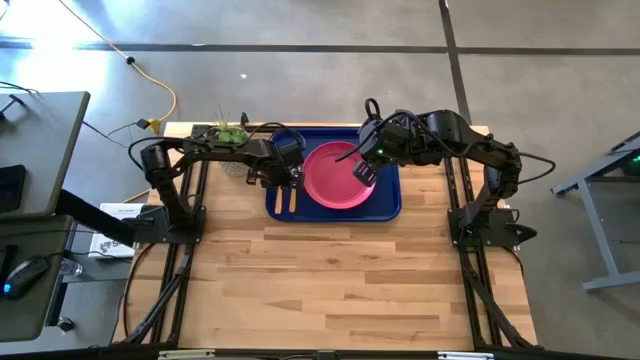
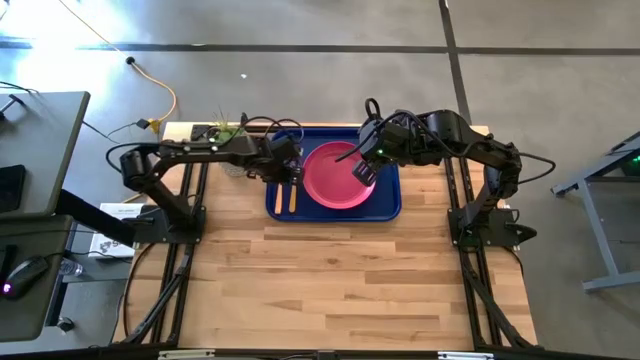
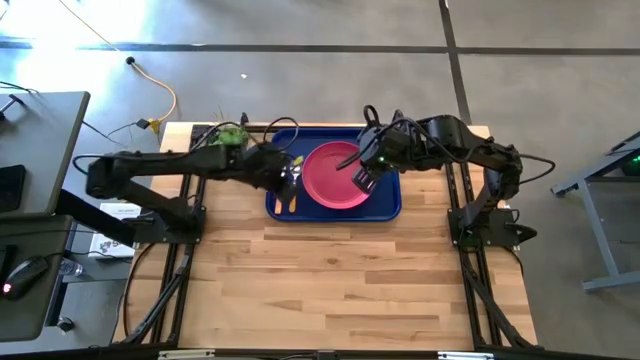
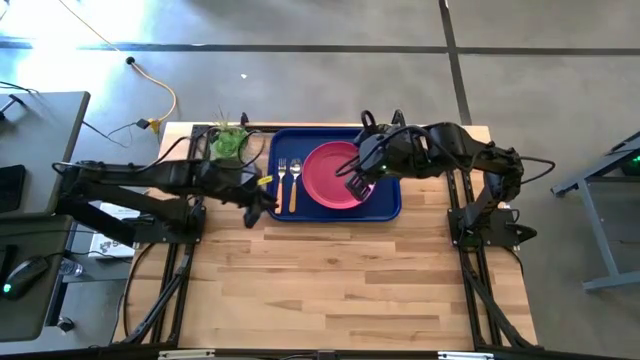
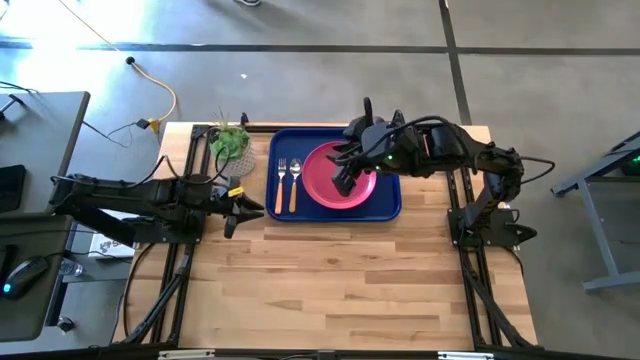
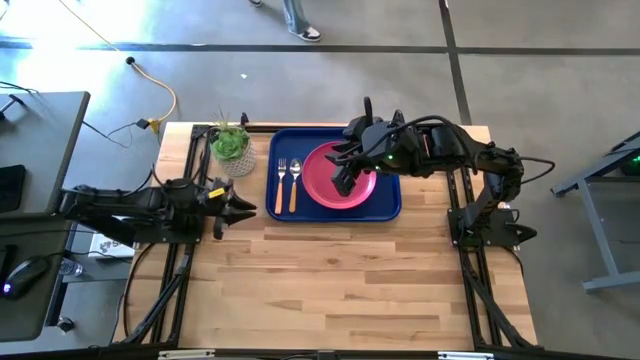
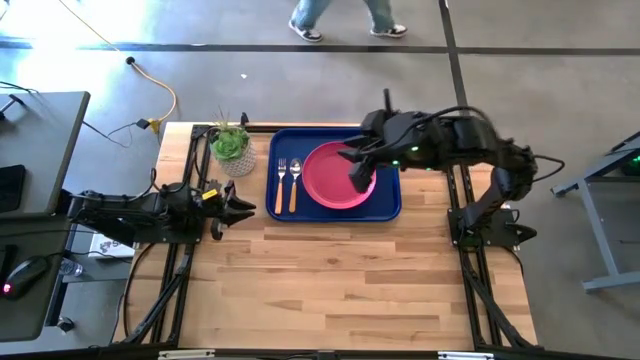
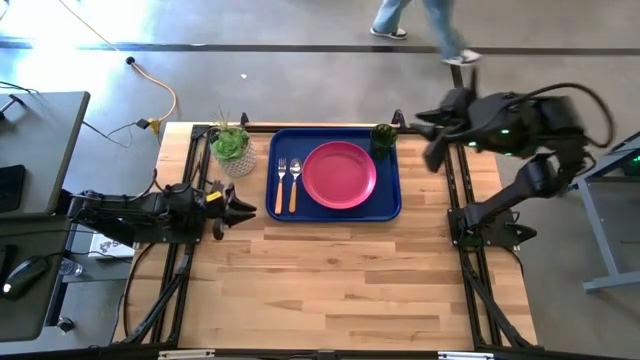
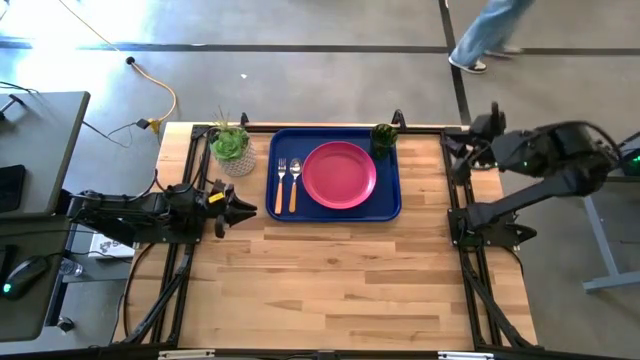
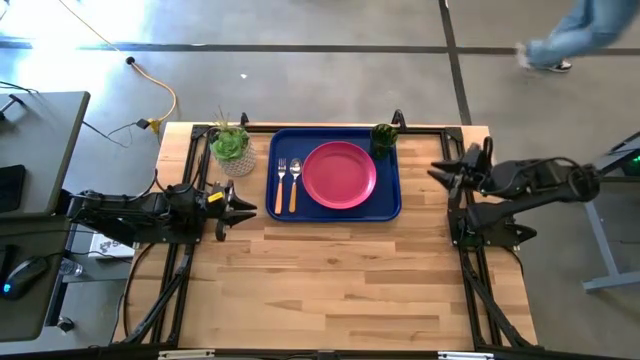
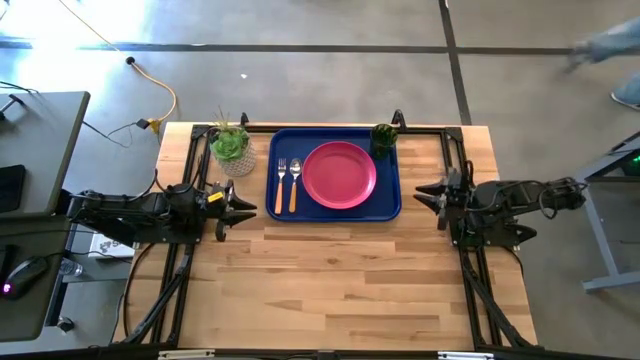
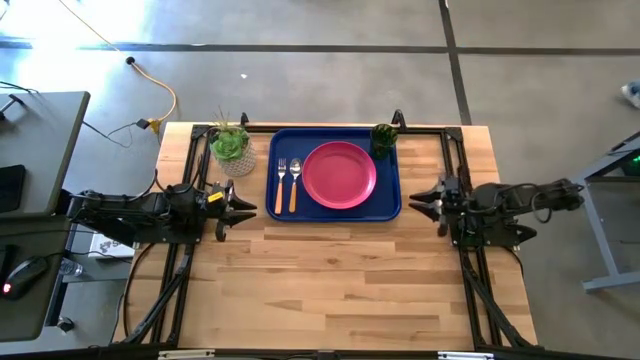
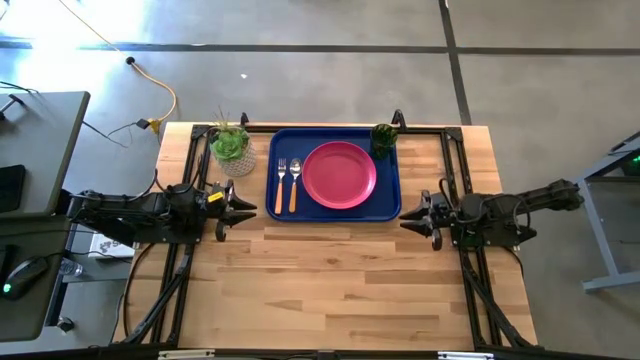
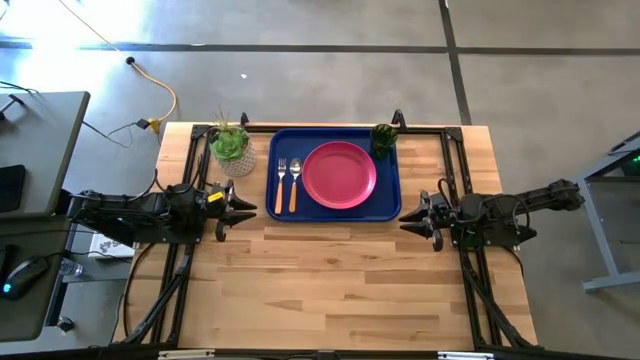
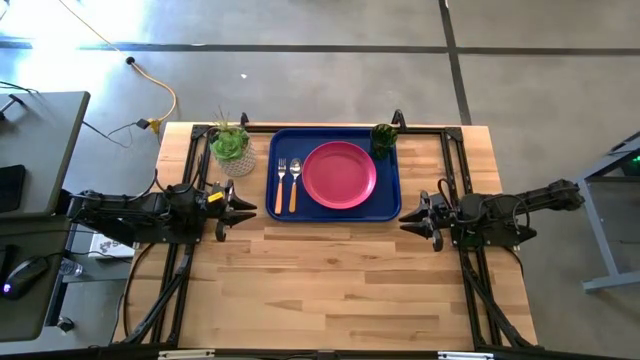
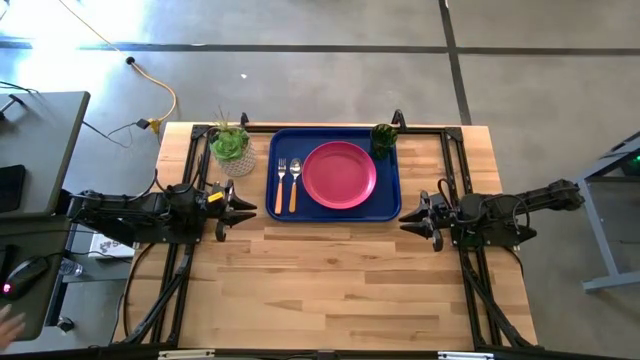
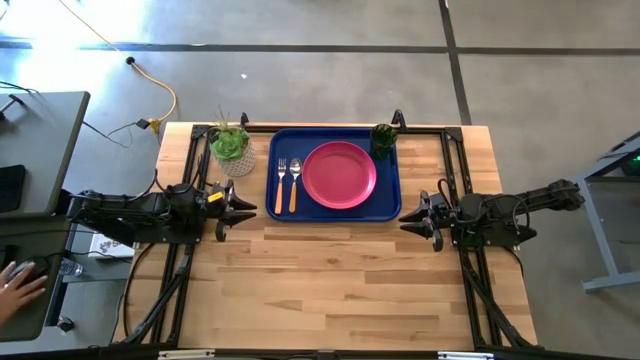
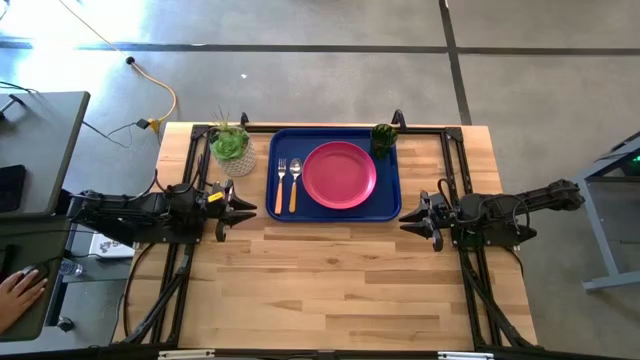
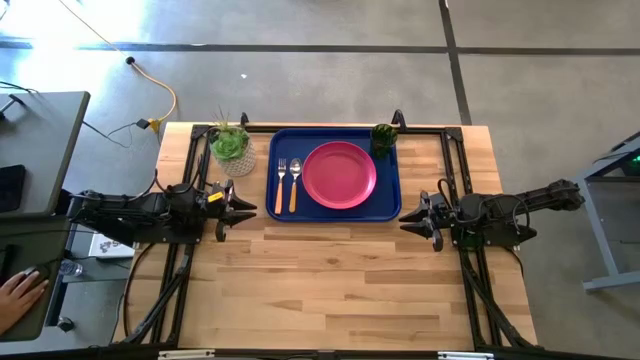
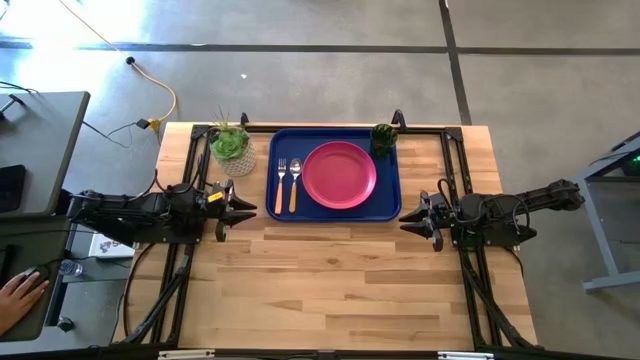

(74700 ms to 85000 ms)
Task: Pick and place plate/cup/fork/spoon on tray
Return to Home Position

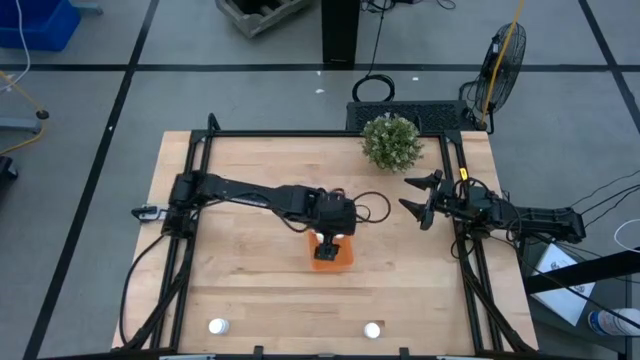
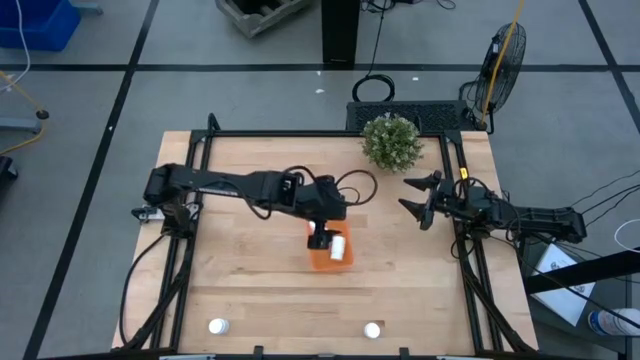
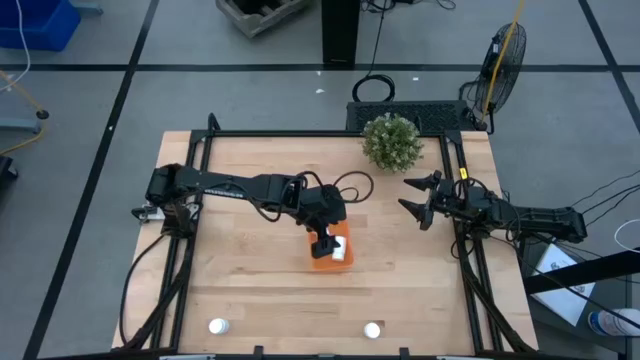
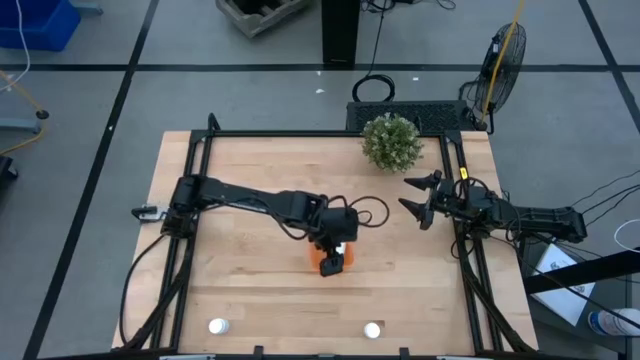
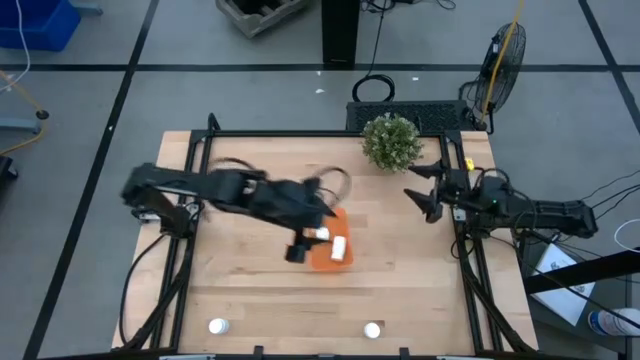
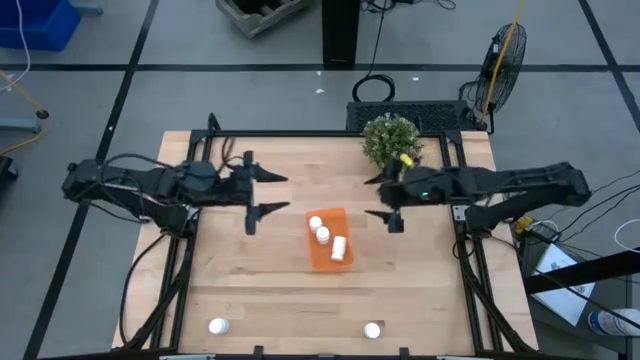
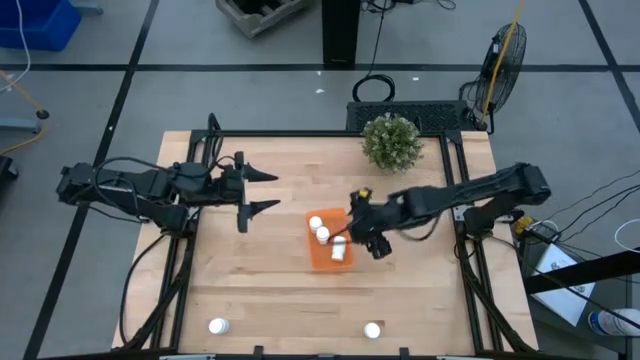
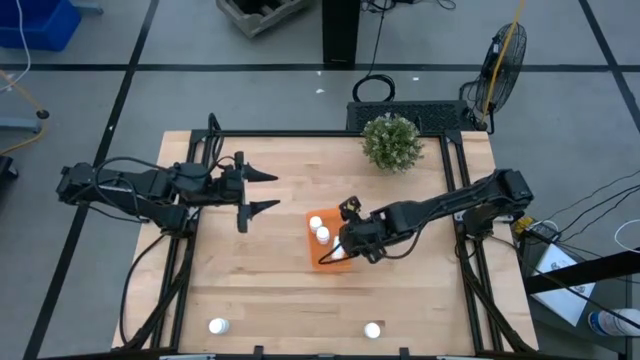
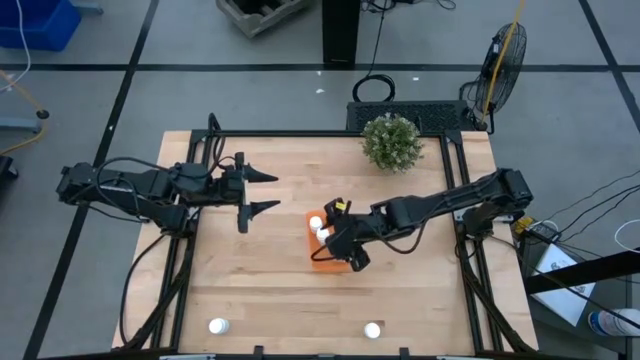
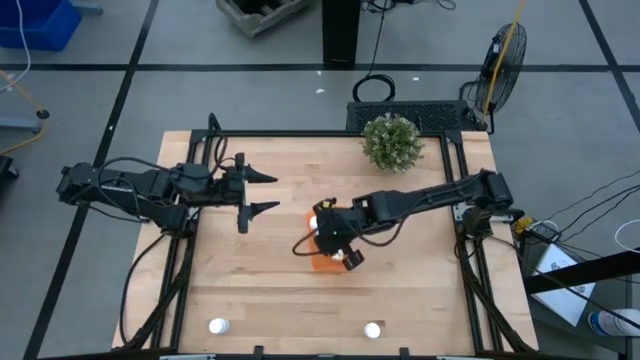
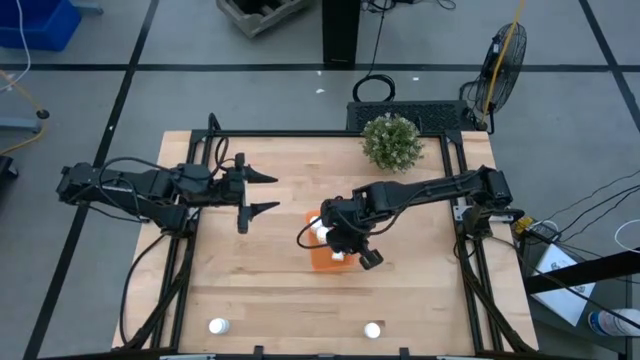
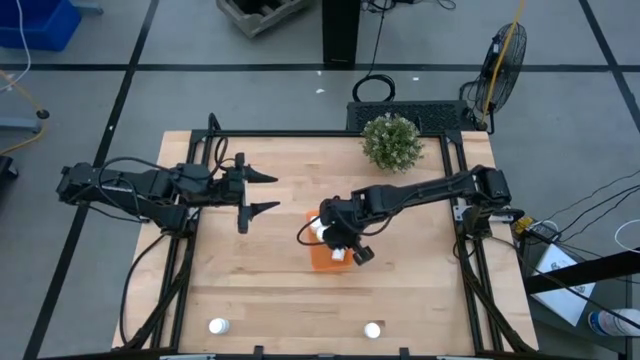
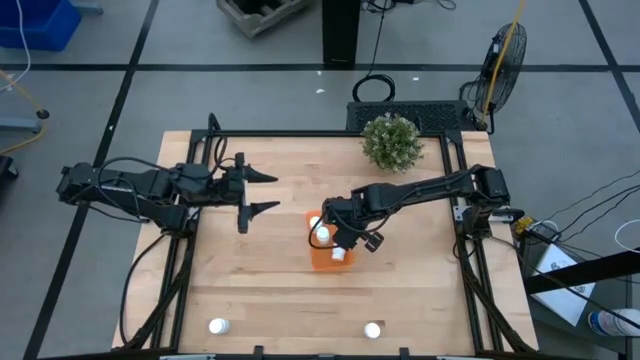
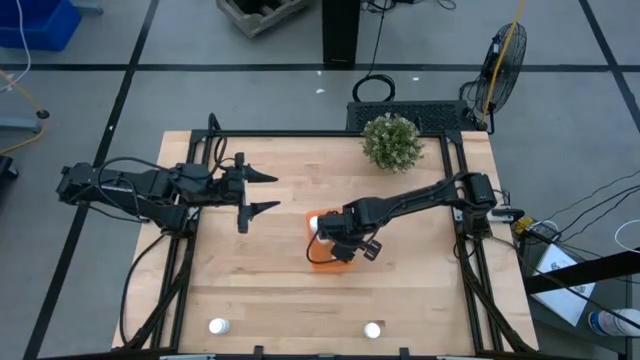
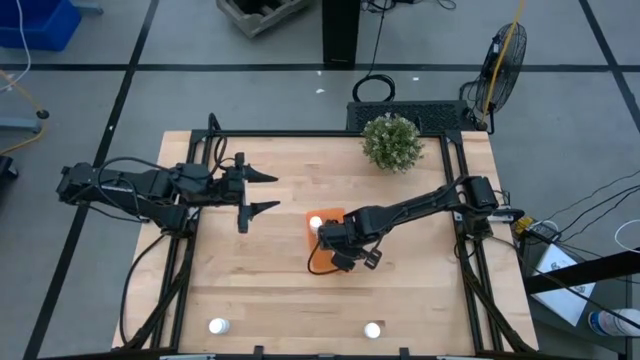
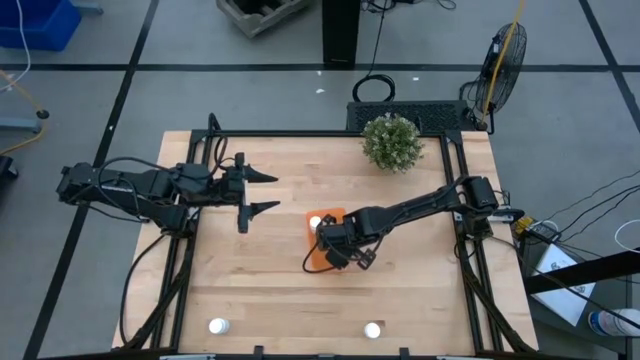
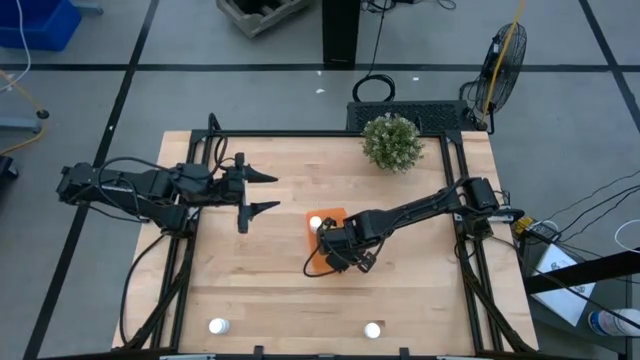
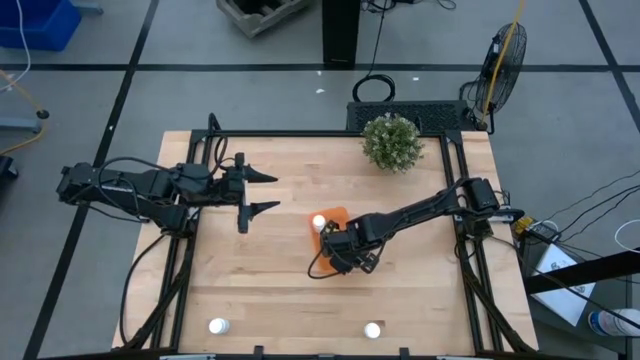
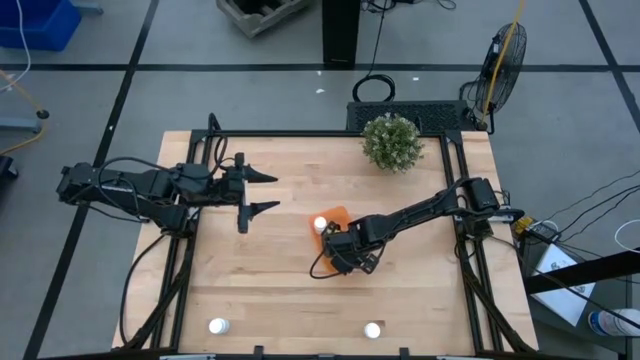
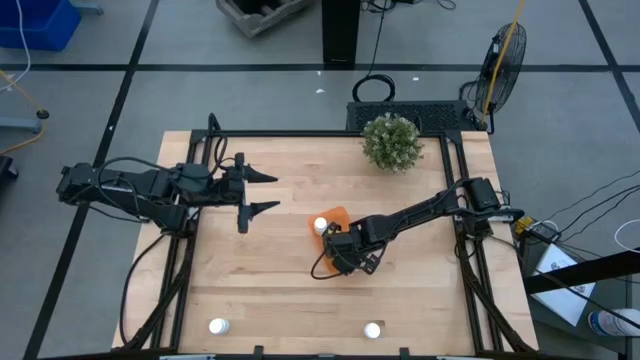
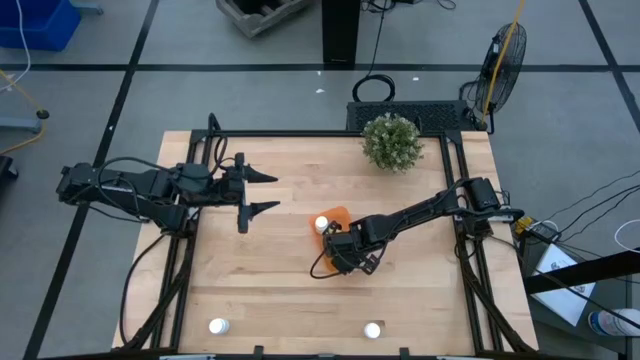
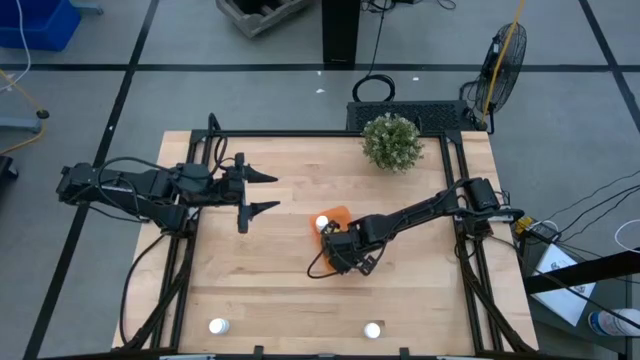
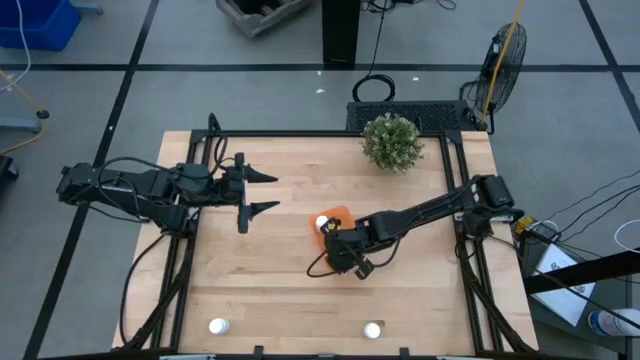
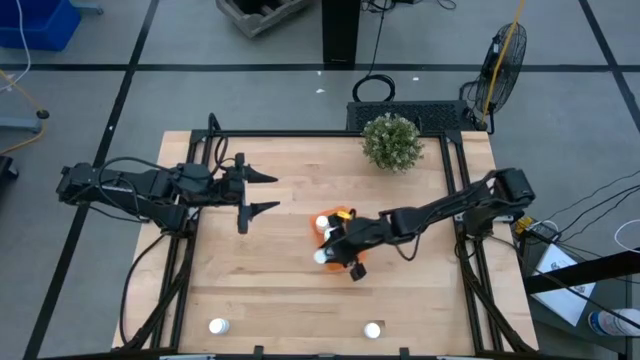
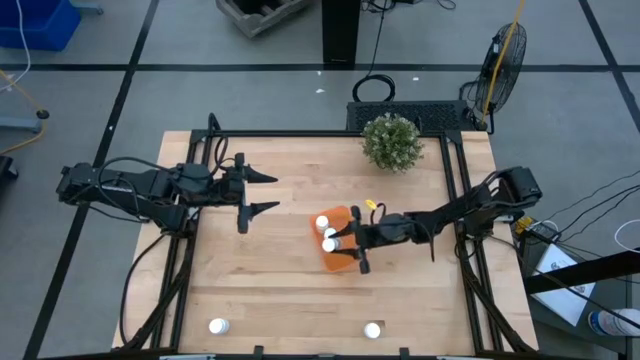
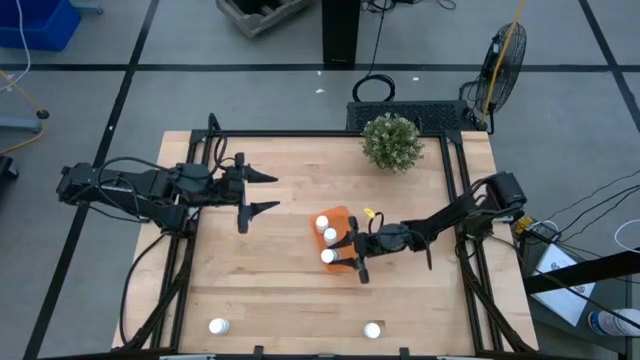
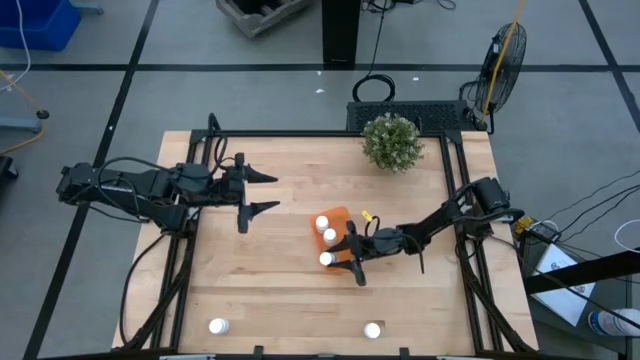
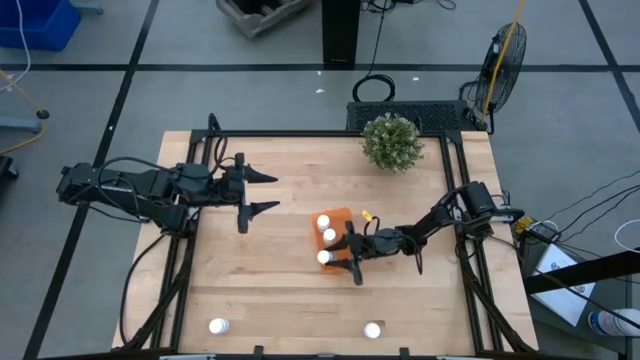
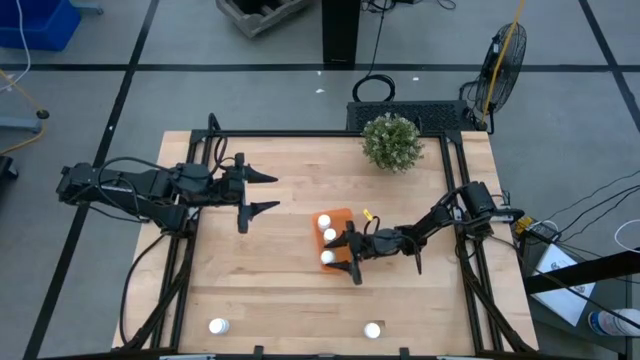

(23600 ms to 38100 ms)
Task: Pick and place pill bottles into a basket
Adjust the white pill bottle in the orange container
